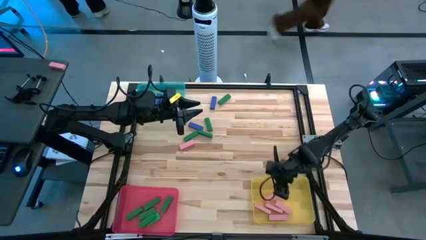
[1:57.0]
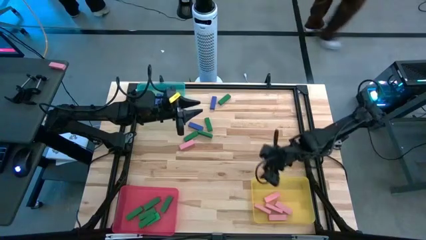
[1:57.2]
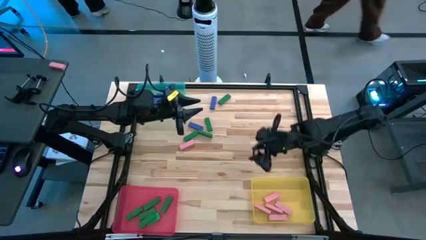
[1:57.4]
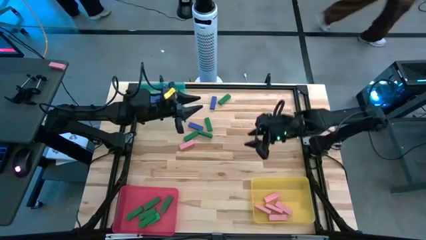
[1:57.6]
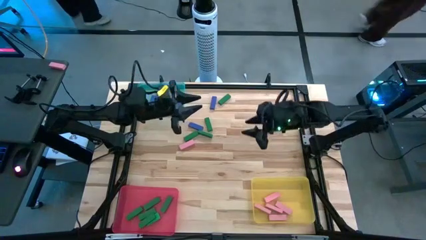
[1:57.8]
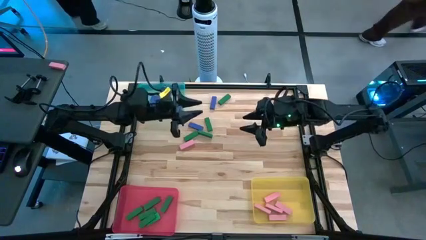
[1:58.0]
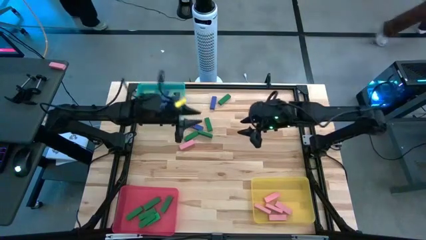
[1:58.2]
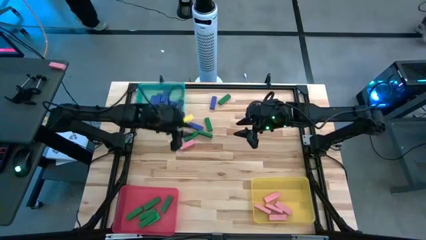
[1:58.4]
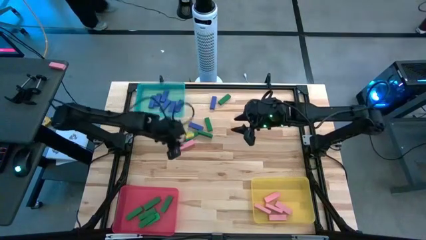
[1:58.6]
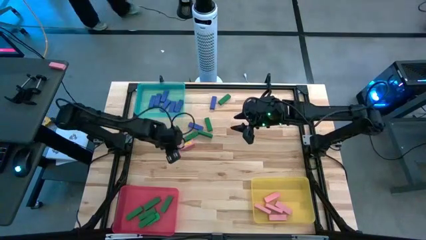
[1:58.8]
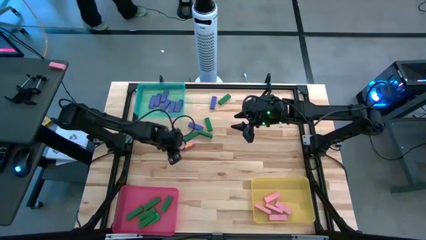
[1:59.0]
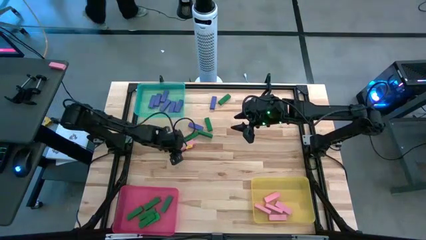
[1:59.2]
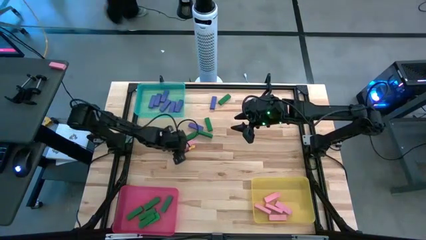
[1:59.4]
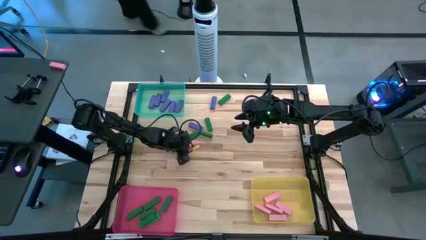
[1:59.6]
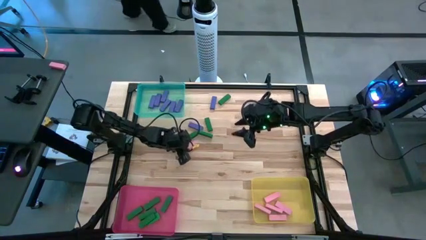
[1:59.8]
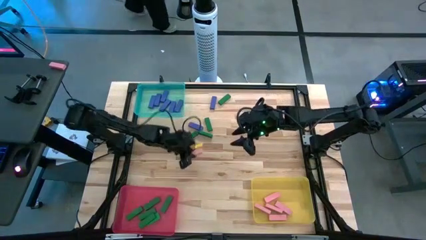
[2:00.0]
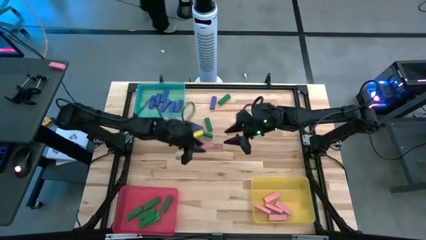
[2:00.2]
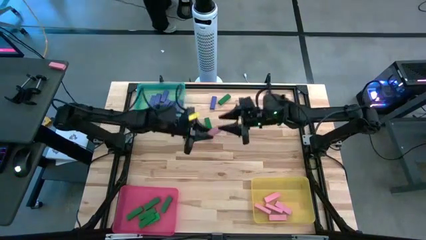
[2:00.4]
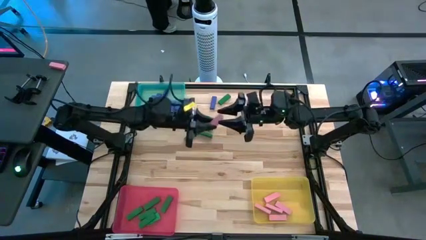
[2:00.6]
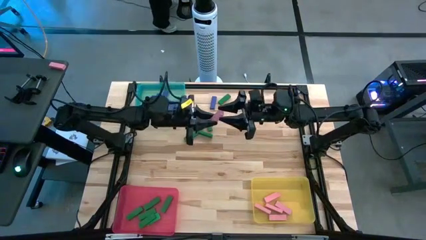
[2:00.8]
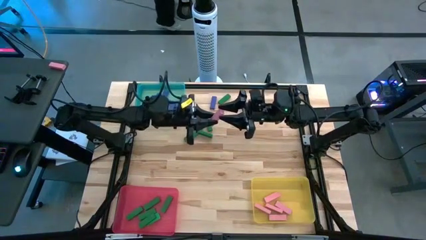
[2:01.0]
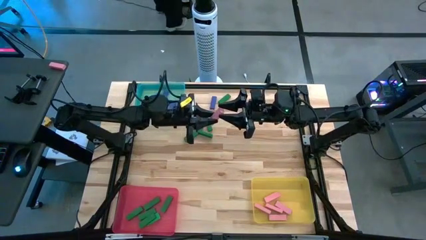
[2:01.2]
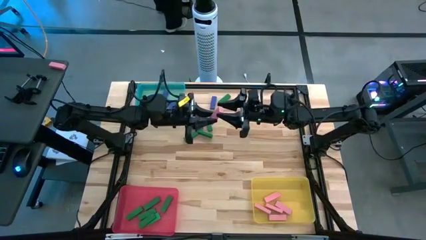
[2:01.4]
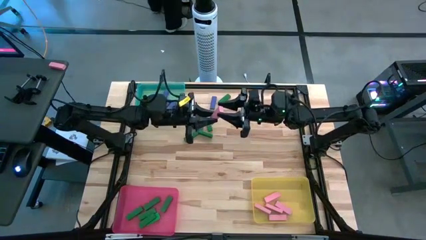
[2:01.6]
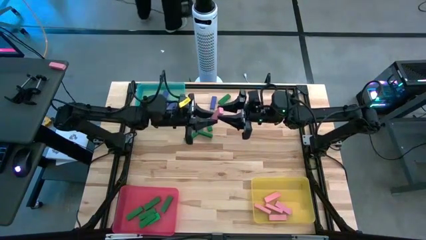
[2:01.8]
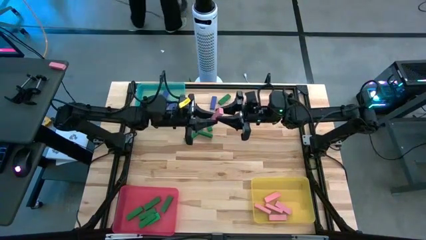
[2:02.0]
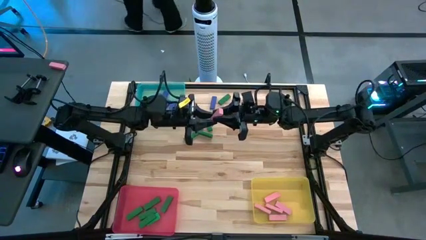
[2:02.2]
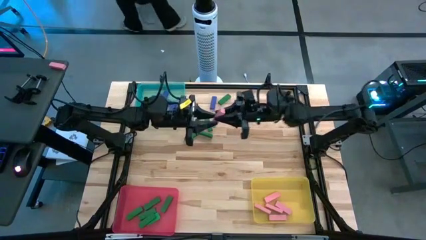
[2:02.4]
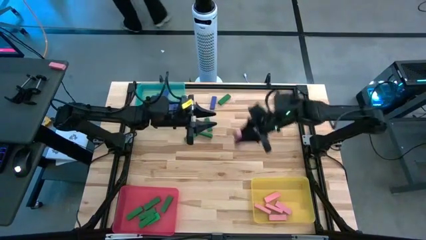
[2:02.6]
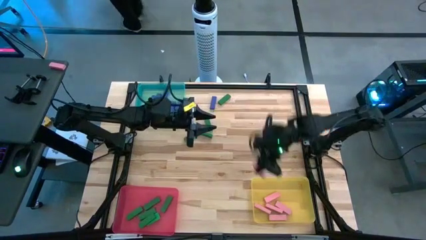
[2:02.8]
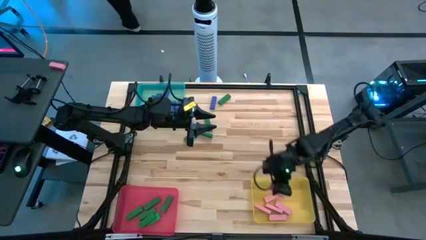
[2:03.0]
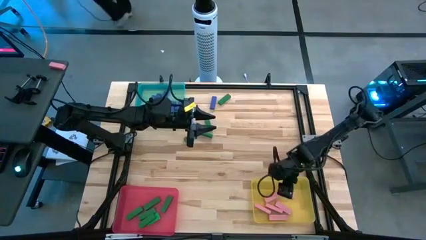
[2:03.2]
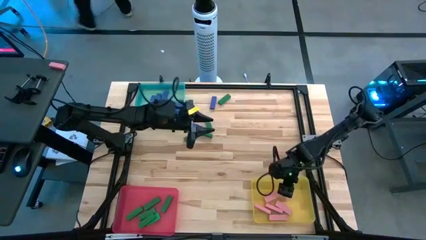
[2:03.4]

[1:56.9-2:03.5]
Task: Sort blocks
Put the pink block into the yellow bin

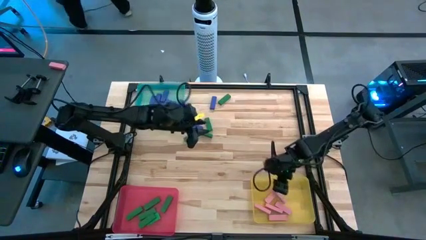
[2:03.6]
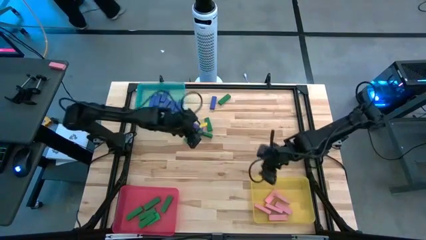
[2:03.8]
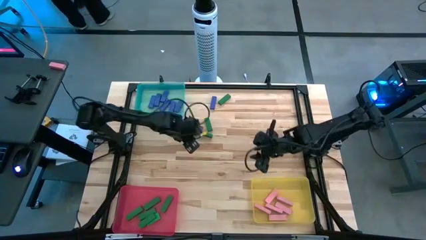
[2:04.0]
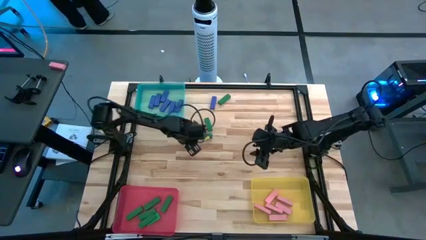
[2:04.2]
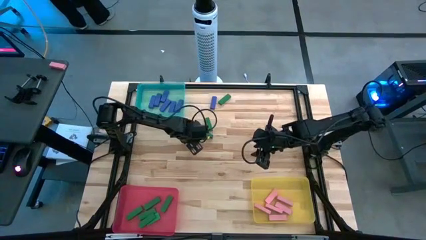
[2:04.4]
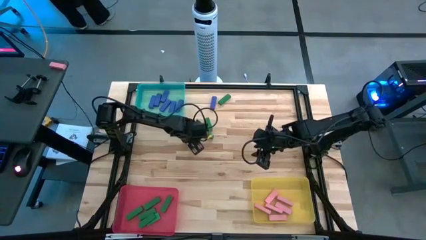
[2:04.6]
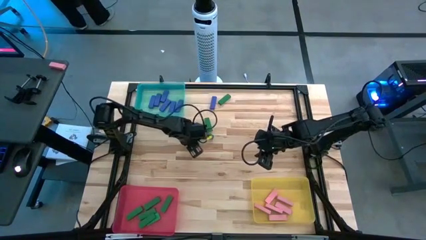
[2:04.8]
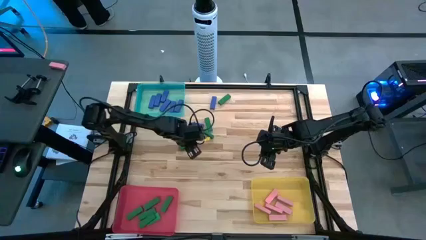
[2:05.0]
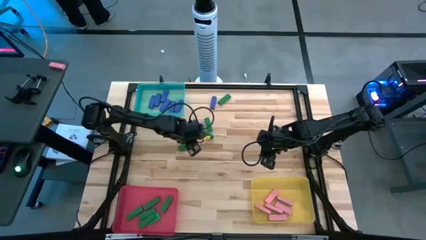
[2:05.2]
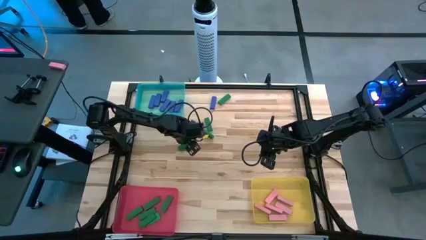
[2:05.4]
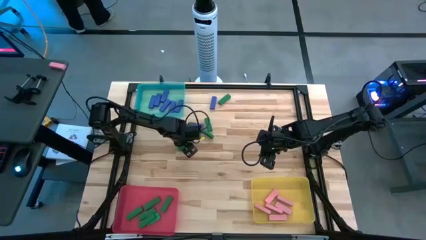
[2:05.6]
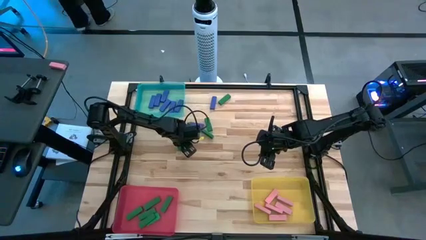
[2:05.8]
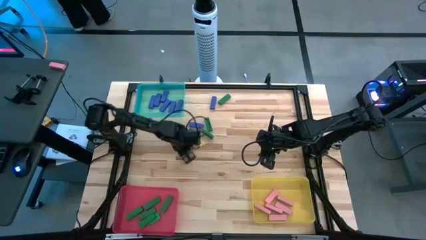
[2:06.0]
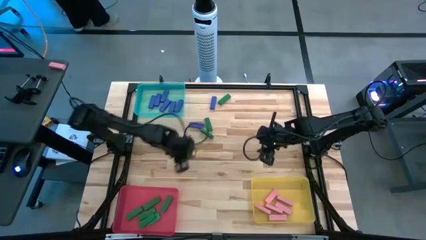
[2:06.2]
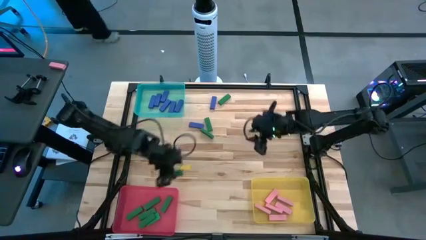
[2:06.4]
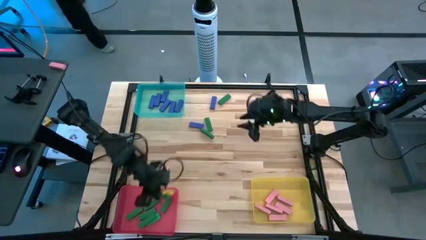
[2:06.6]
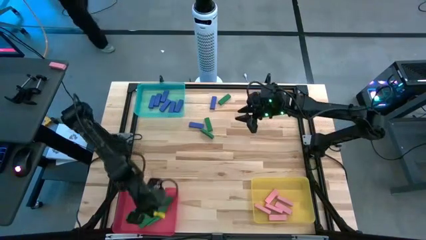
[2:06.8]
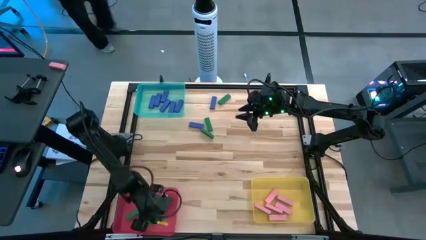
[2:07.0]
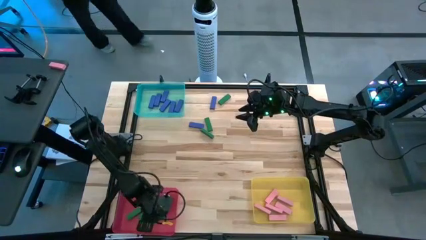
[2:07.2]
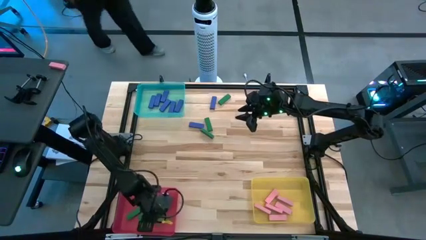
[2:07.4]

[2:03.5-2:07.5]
Put the green block into the red bin

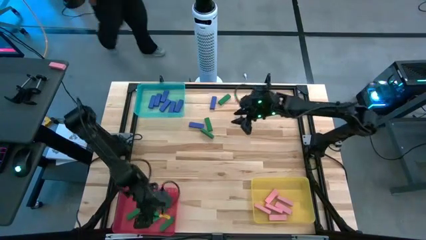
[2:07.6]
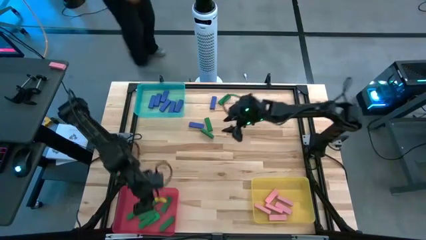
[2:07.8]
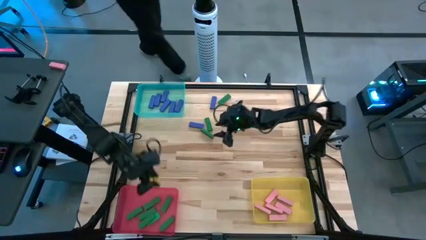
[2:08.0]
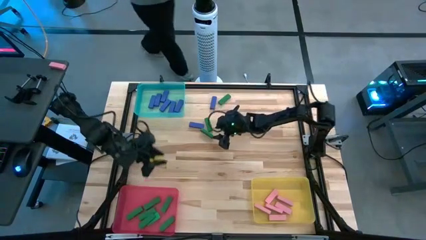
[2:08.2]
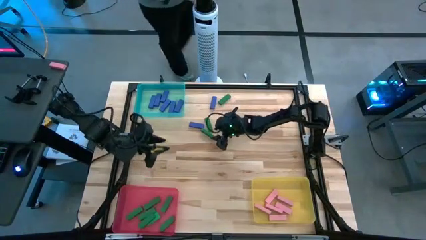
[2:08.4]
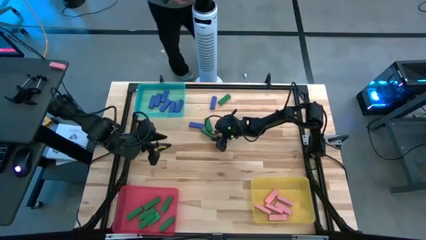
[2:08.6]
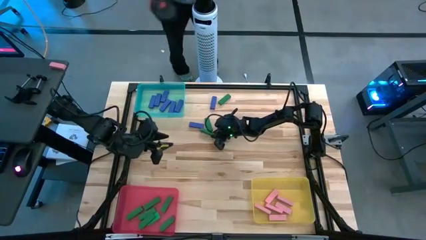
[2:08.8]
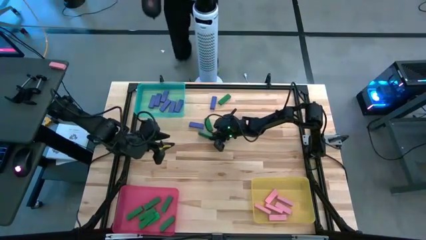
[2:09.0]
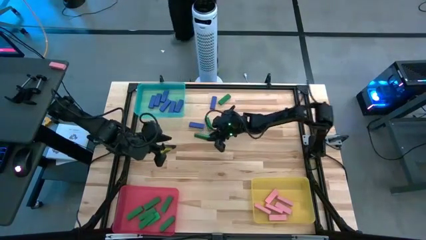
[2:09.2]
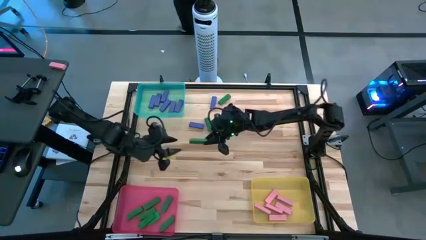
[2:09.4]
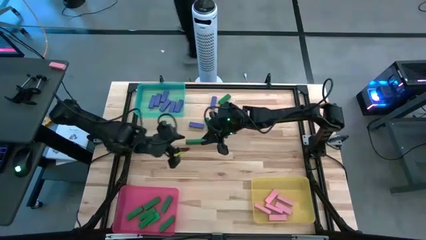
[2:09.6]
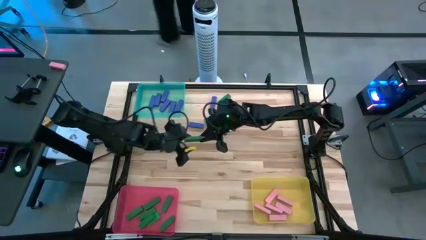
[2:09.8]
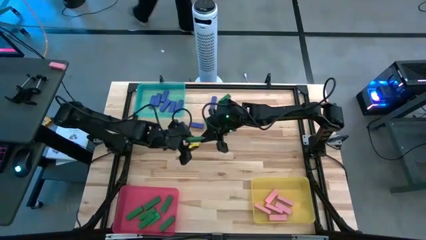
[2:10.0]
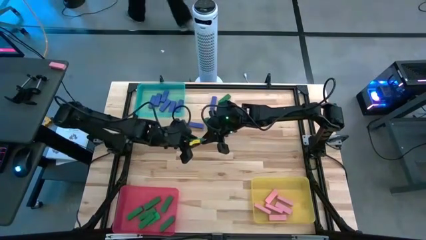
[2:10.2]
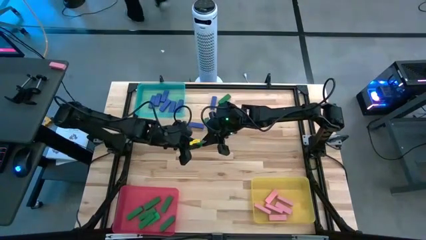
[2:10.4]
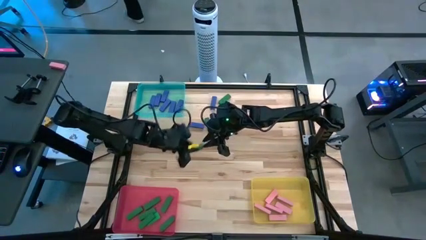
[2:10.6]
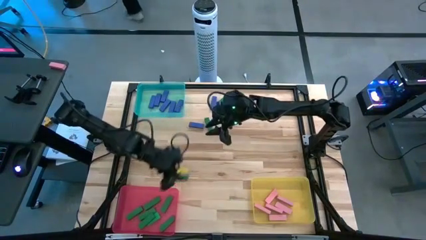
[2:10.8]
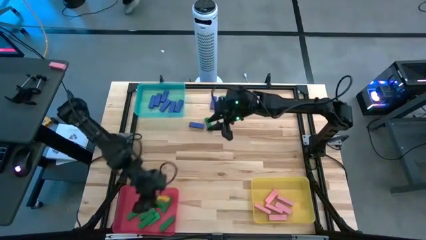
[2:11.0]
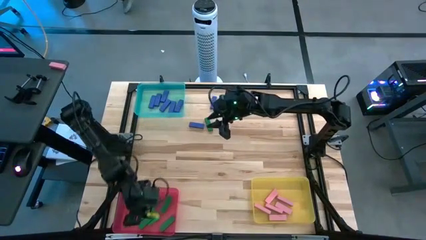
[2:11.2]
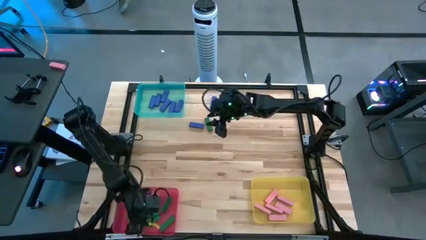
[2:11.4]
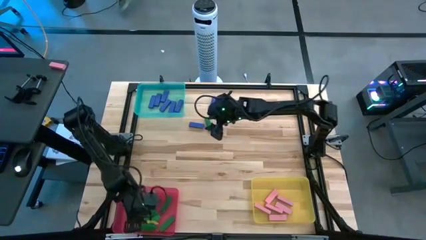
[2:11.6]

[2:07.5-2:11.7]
Put the green block into the red bin

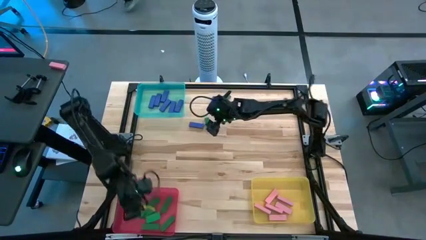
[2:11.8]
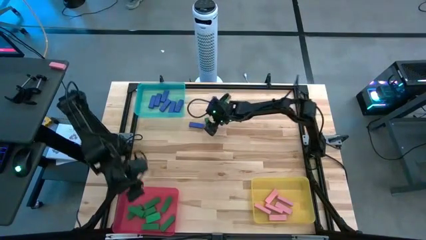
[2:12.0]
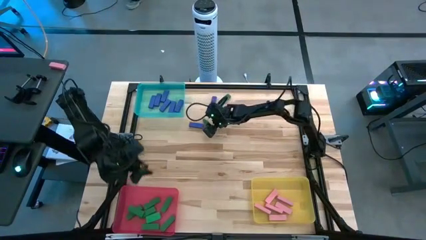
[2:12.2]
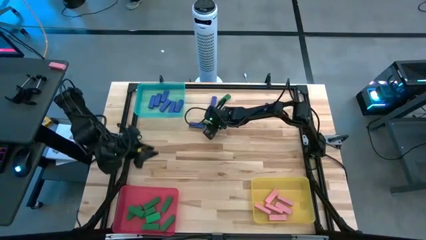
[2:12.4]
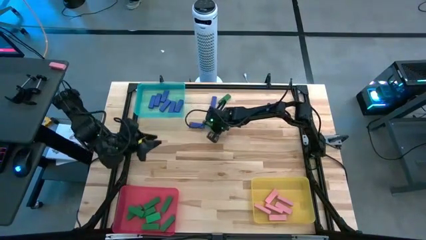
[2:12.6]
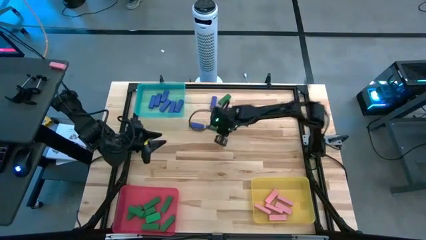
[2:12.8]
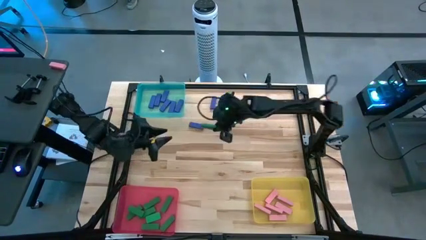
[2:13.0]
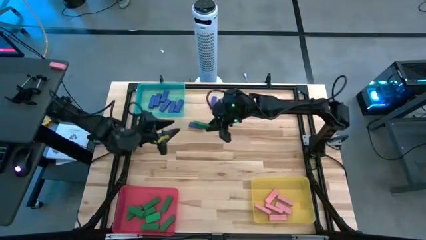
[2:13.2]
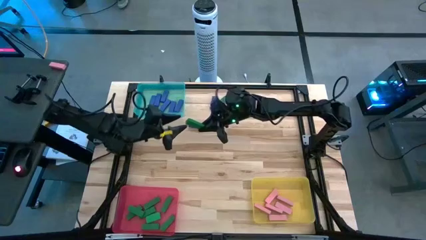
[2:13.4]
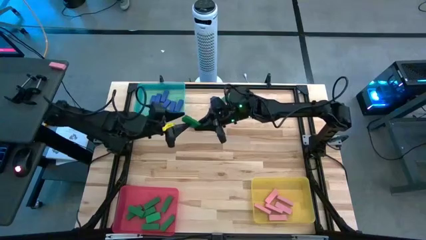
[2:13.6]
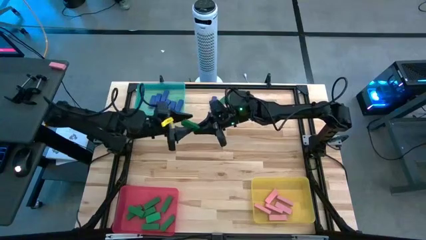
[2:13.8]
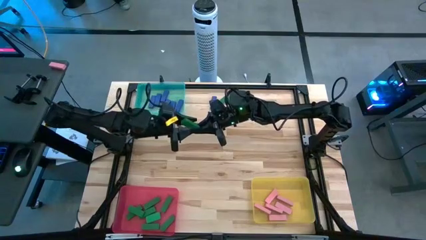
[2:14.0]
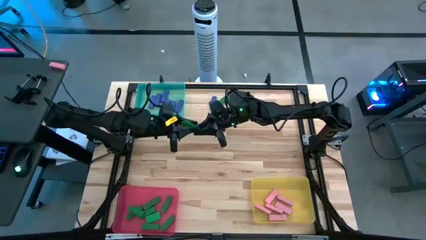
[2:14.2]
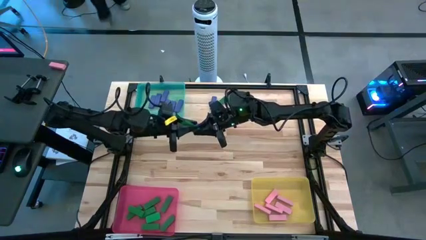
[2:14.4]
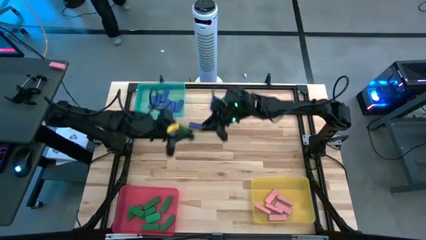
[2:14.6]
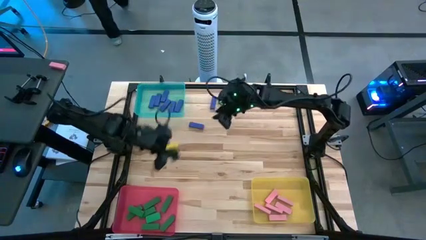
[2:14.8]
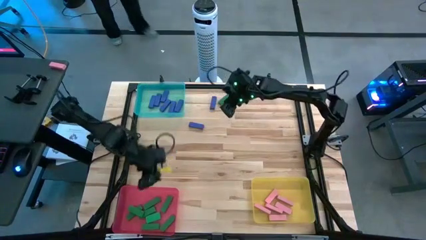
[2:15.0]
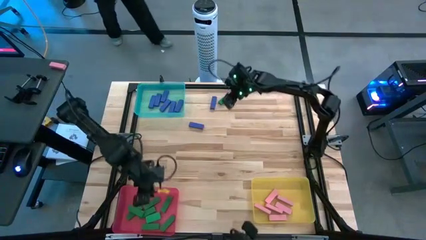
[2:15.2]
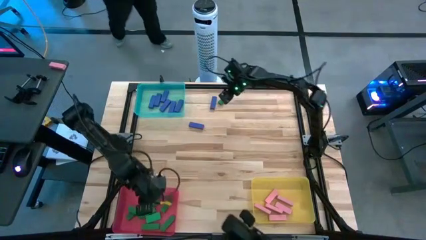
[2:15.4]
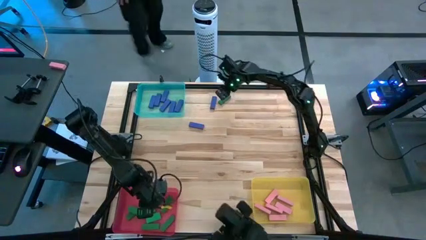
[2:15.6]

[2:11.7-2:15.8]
Put the green block into the red bin
